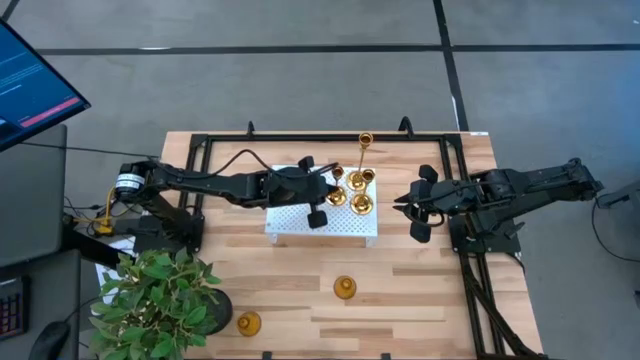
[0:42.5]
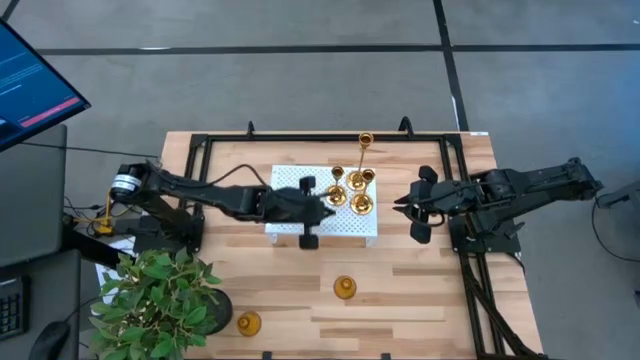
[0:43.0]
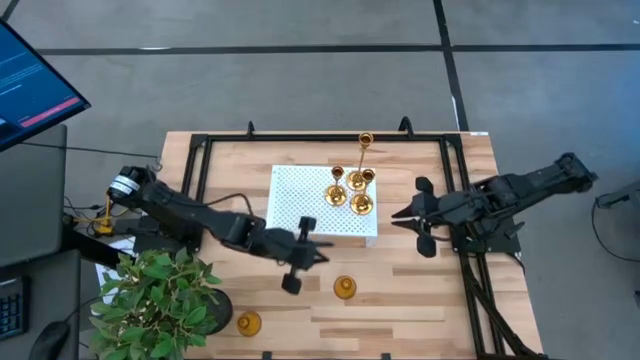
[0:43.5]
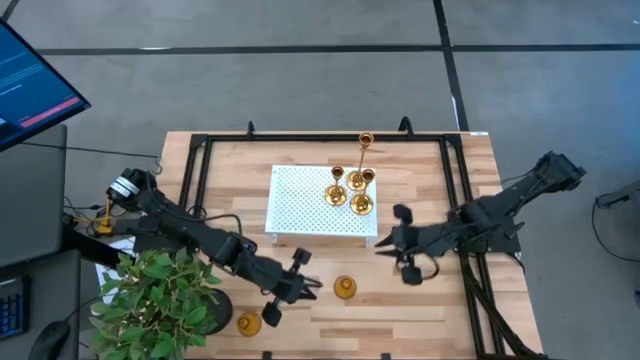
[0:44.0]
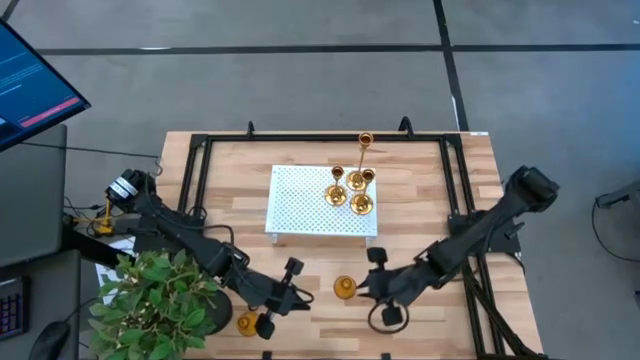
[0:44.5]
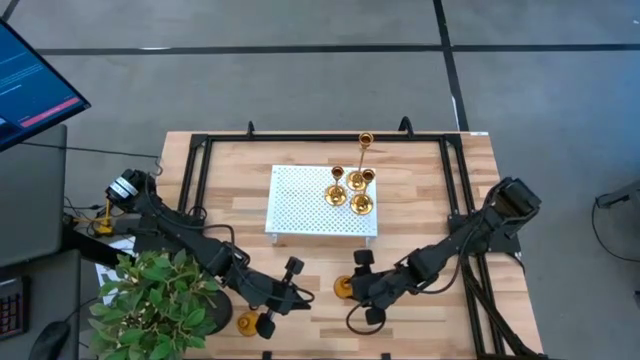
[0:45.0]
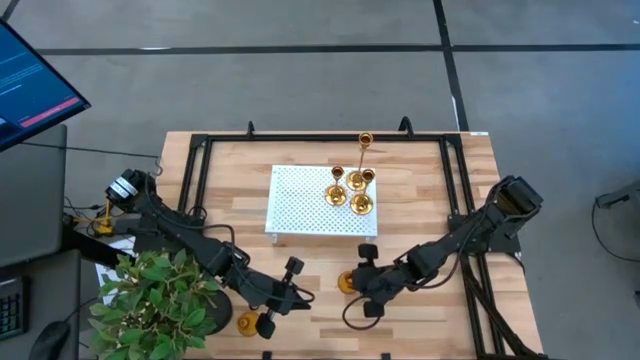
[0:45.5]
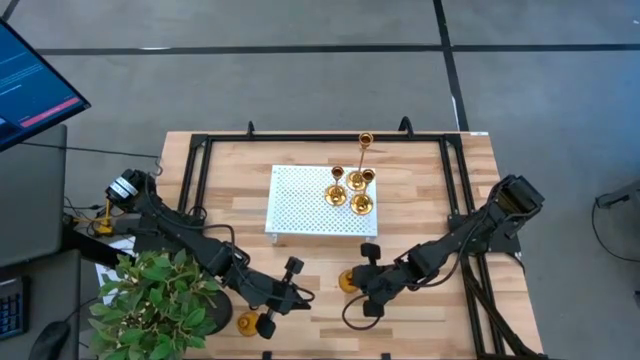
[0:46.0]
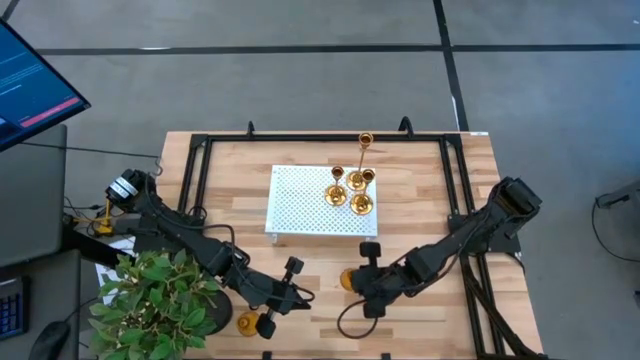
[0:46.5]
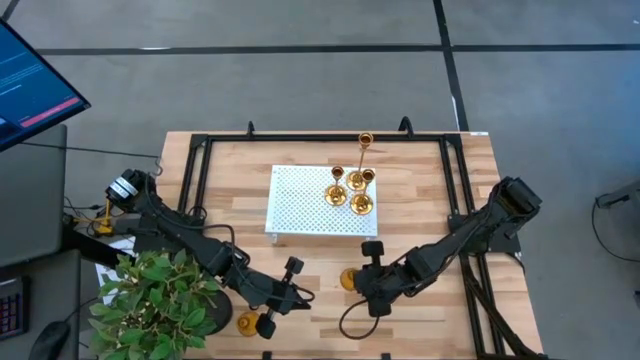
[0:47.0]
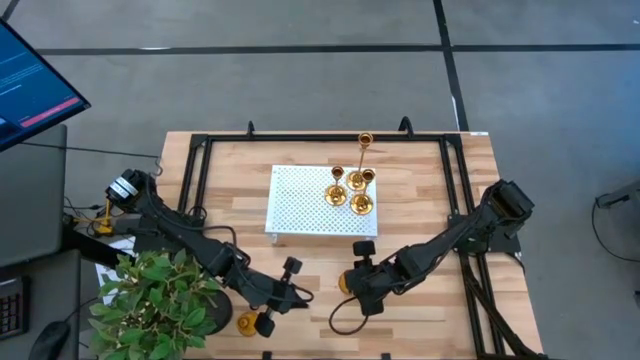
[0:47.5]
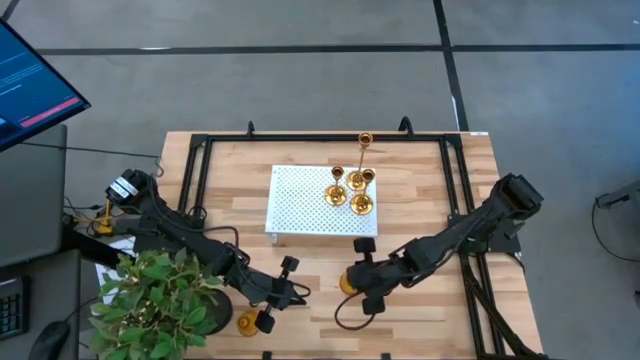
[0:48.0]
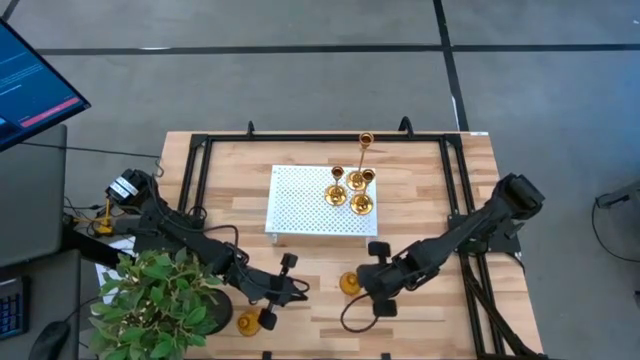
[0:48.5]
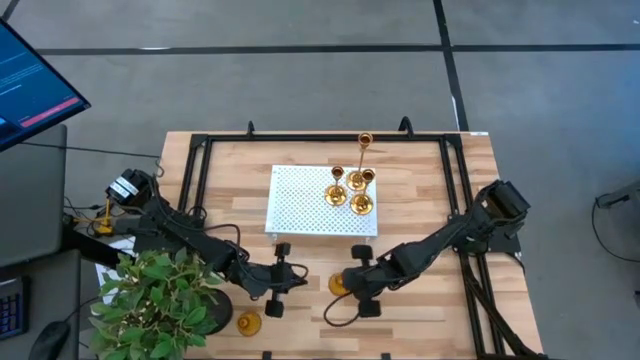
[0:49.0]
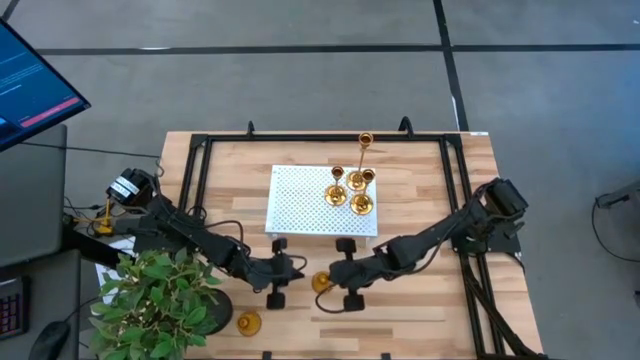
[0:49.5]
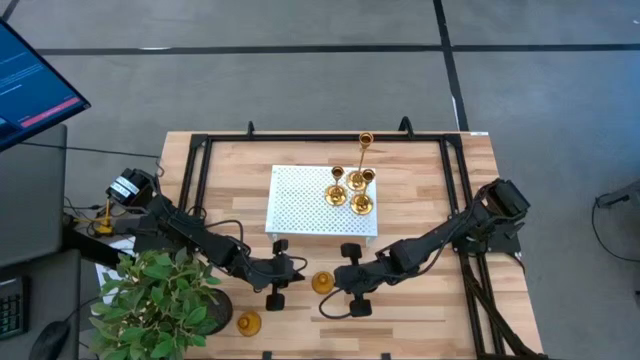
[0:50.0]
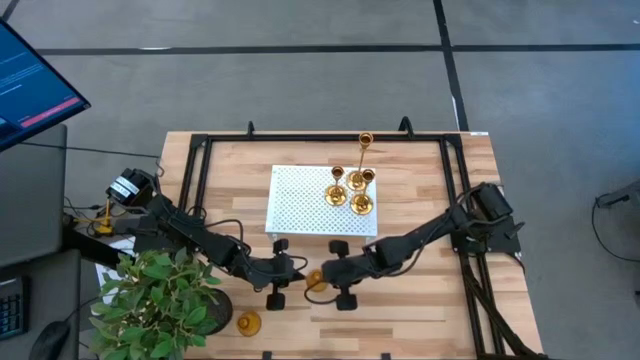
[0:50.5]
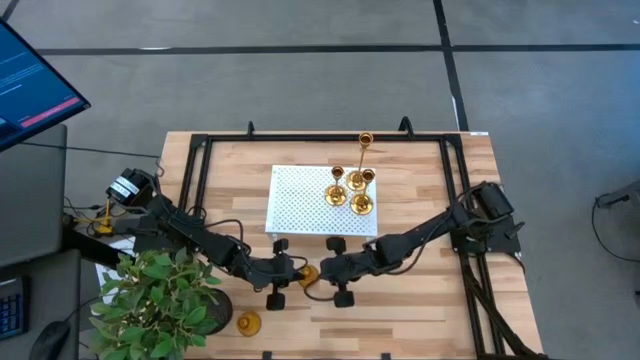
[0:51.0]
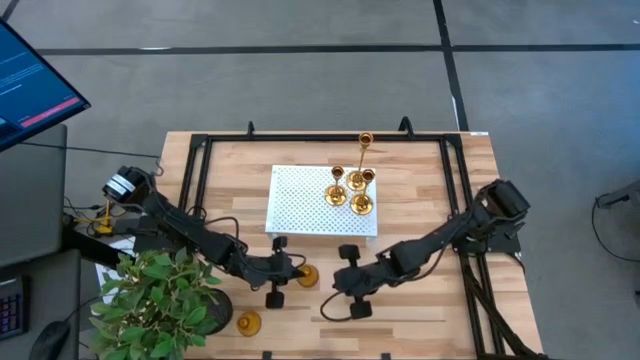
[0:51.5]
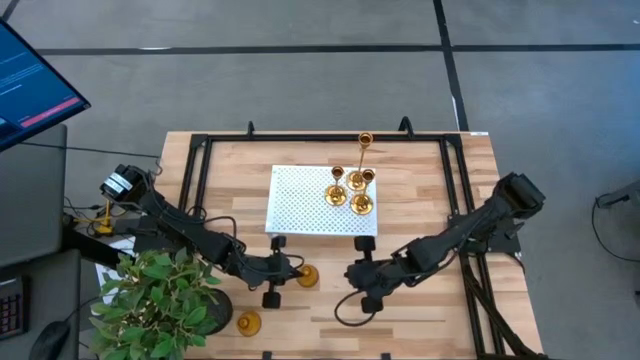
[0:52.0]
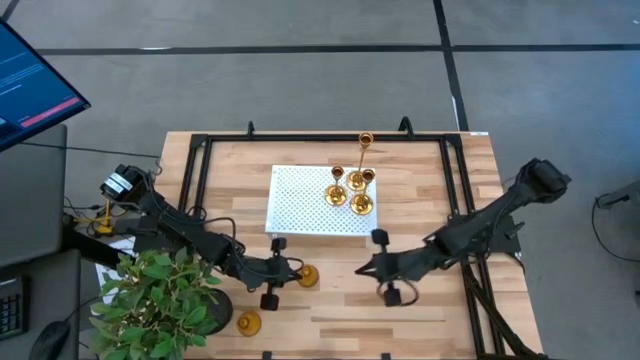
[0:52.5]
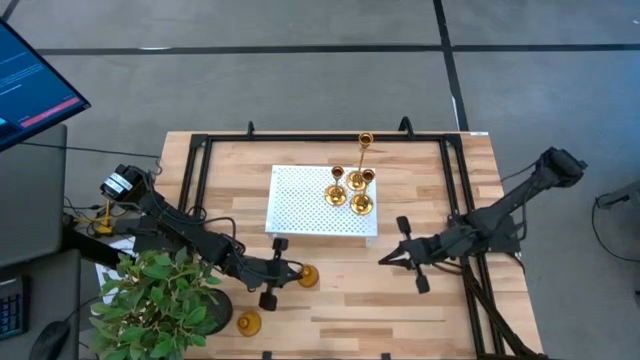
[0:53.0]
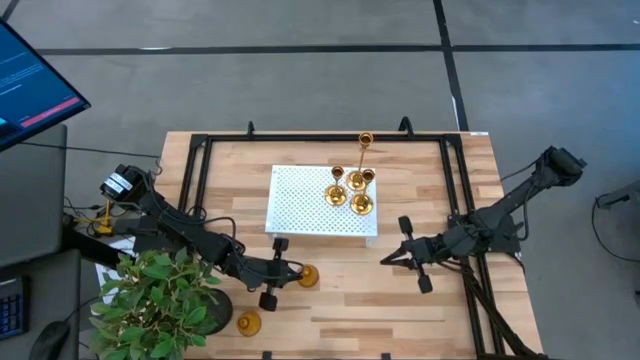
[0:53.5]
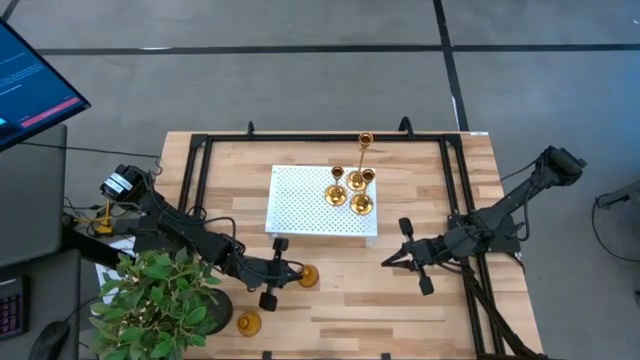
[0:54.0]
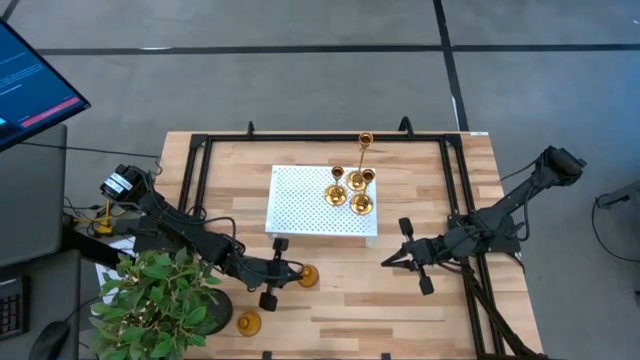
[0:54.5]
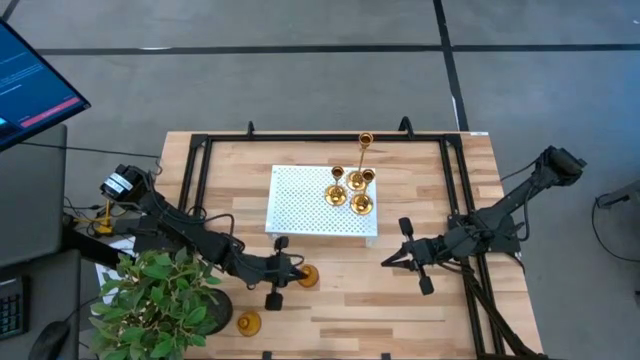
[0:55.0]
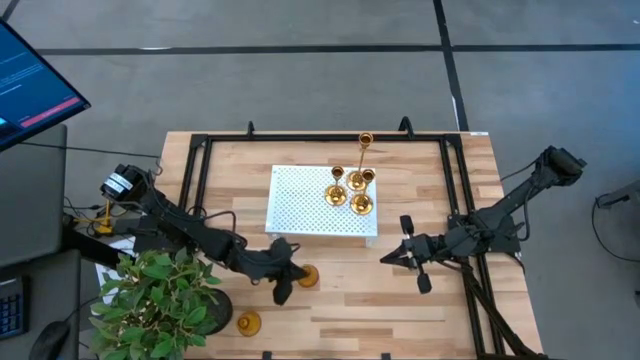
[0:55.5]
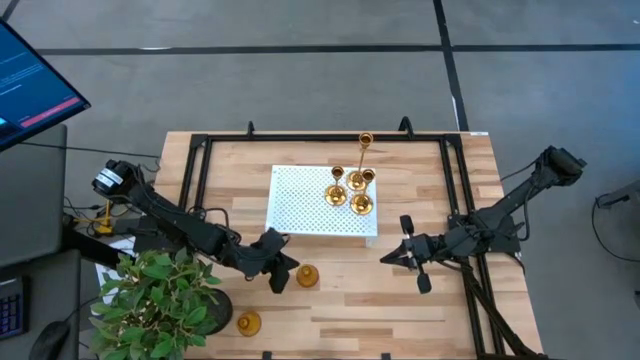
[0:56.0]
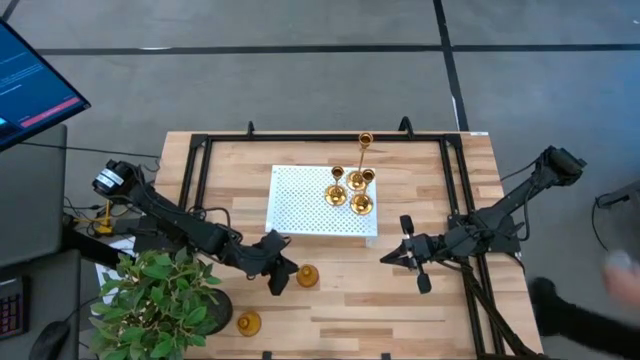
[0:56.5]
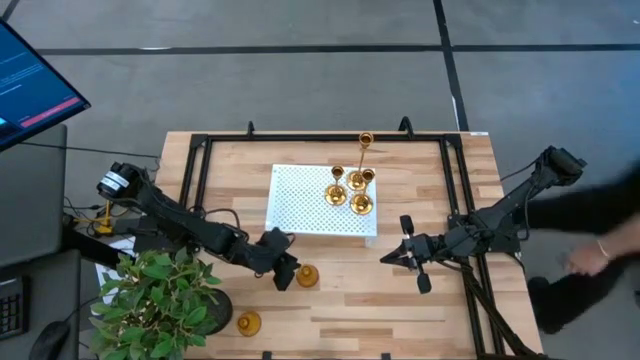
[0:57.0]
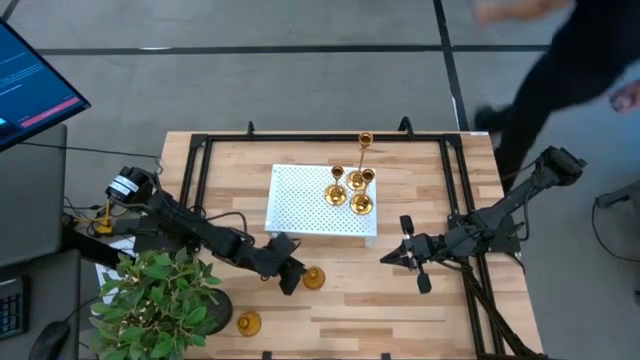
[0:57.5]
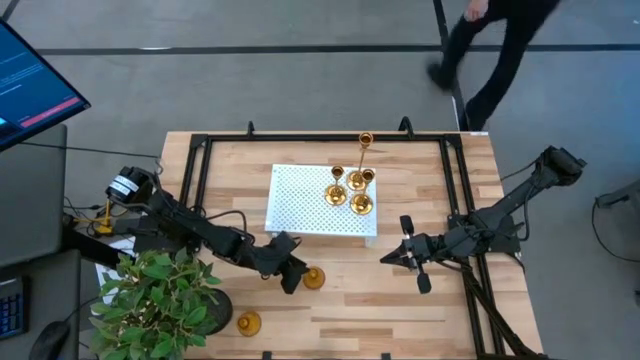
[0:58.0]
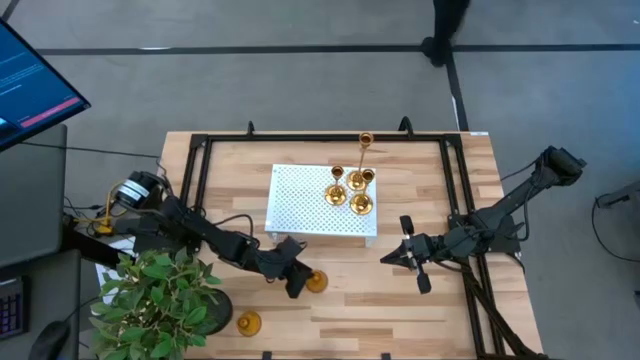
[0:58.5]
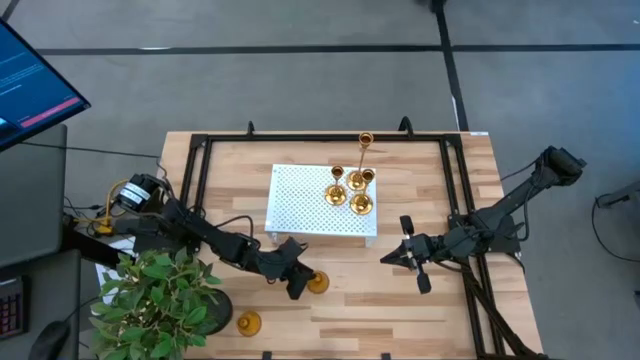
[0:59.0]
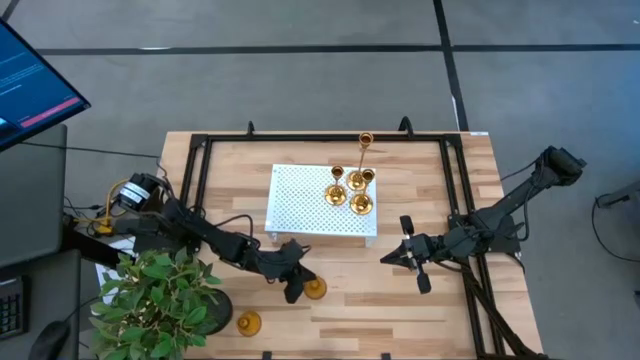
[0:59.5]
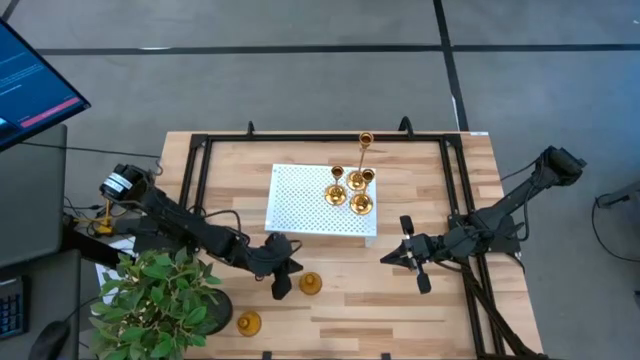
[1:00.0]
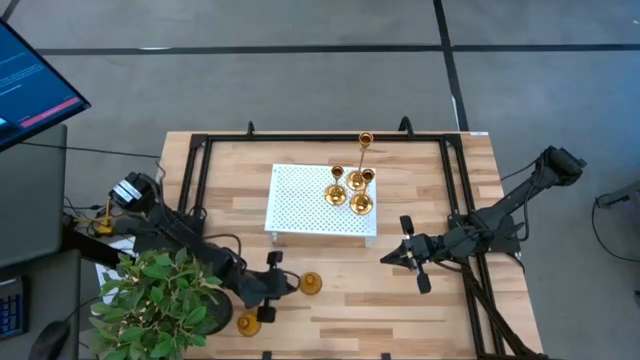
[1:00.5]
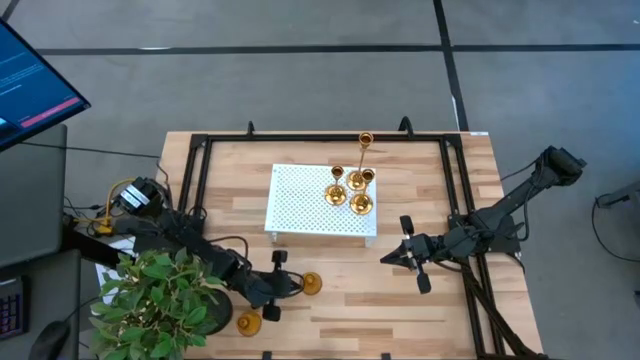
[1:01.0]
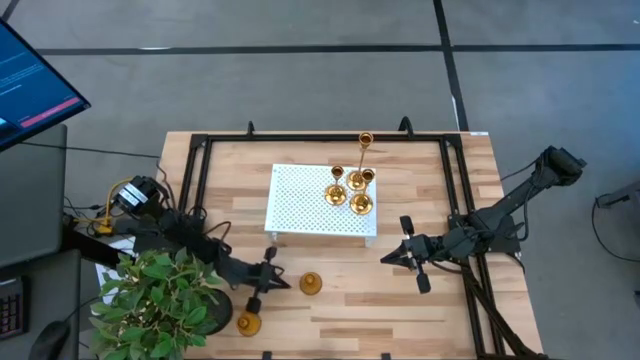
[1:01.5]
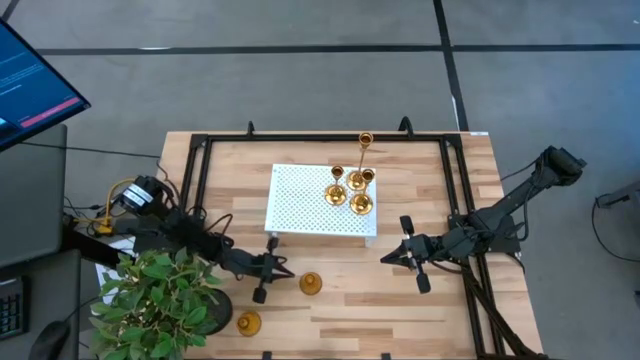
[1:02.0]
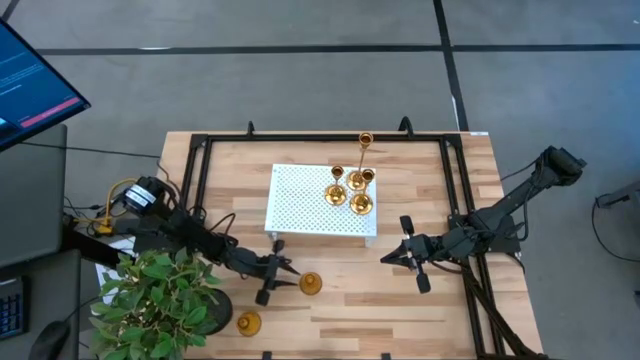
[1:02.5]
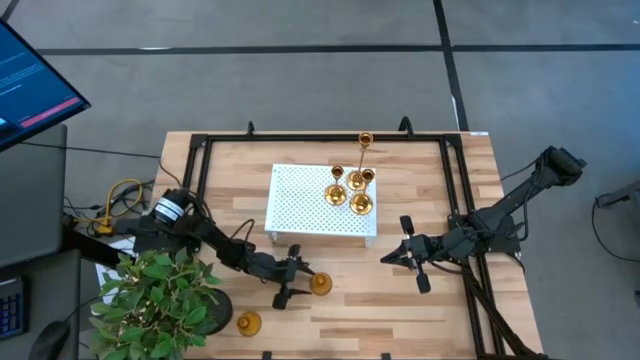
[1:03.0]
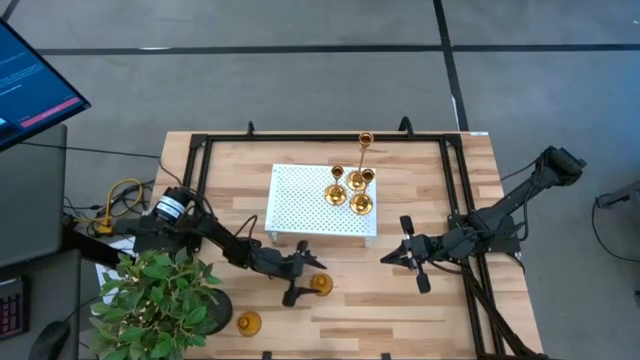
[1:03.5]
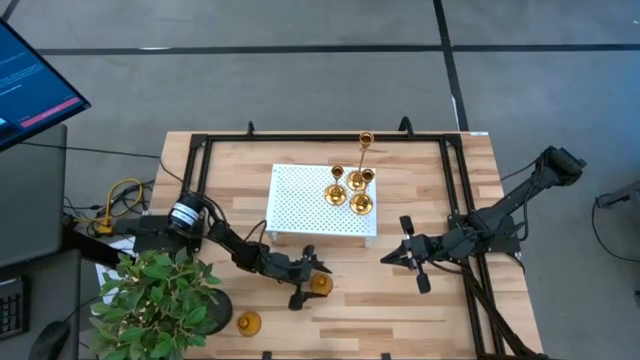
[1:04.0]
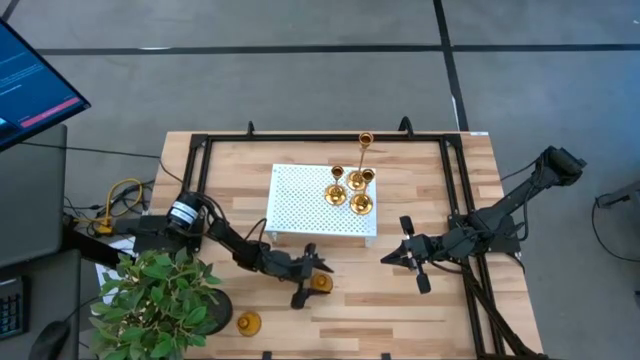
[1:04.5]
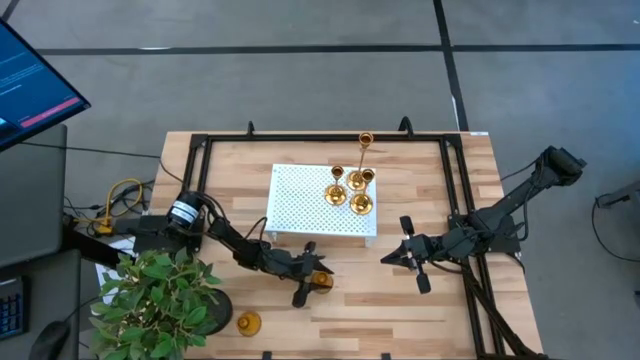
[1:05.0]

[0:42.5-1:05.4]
Task: Pick & Place candle stick holders
Put the top brown vase candle holder on the shelf
